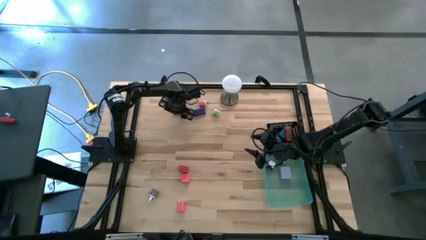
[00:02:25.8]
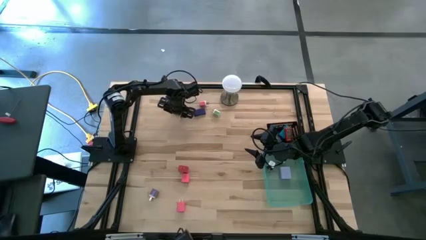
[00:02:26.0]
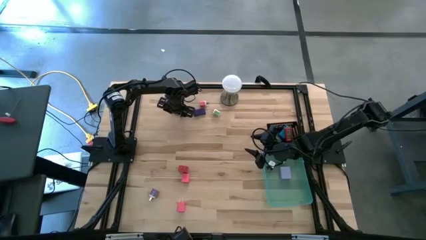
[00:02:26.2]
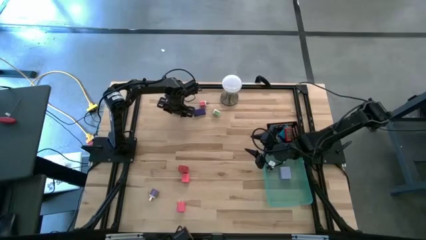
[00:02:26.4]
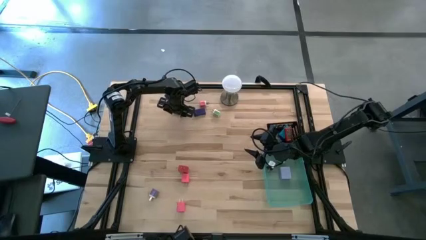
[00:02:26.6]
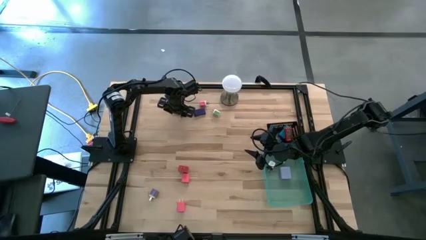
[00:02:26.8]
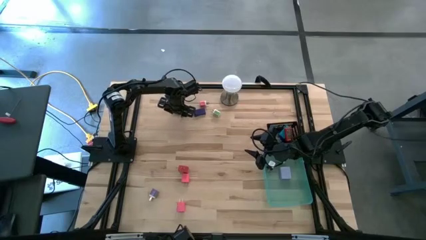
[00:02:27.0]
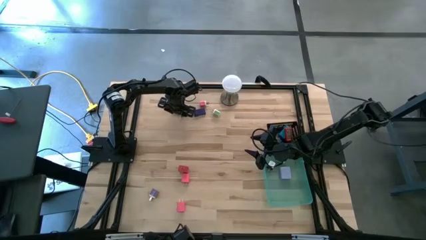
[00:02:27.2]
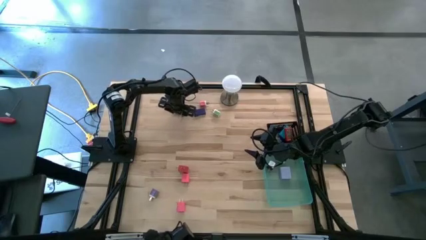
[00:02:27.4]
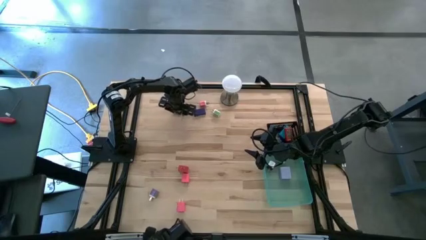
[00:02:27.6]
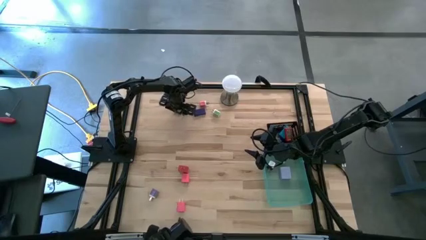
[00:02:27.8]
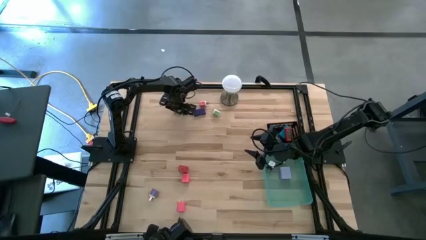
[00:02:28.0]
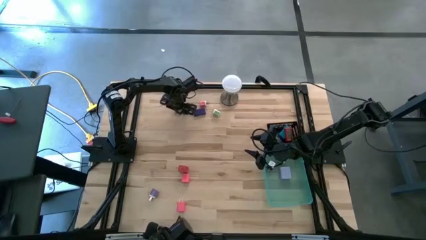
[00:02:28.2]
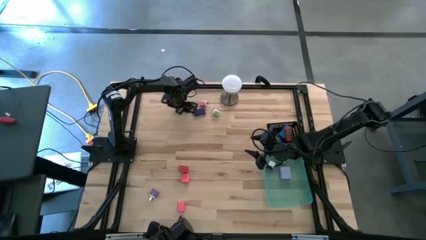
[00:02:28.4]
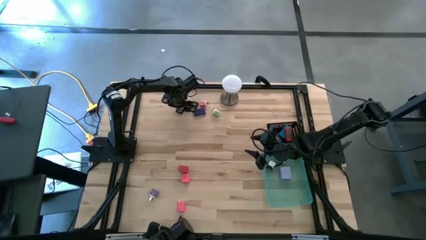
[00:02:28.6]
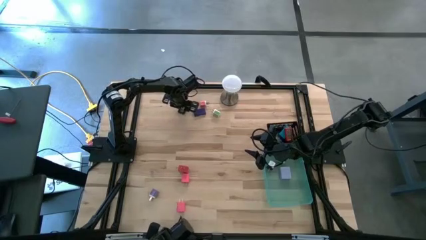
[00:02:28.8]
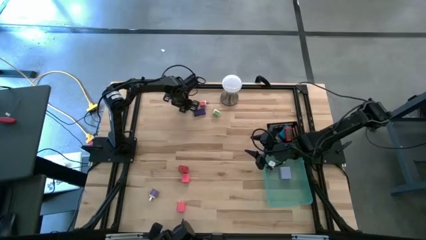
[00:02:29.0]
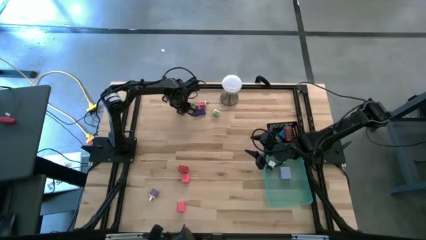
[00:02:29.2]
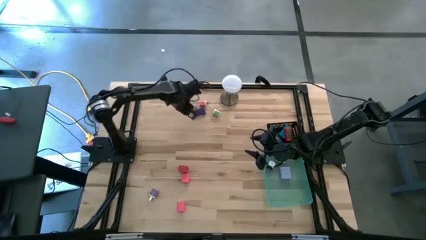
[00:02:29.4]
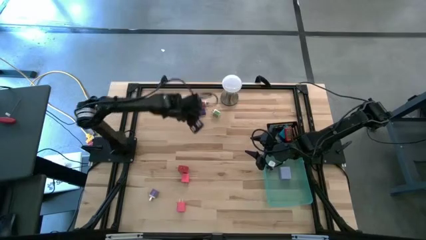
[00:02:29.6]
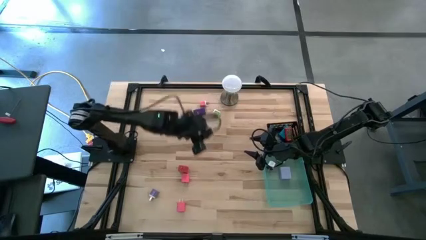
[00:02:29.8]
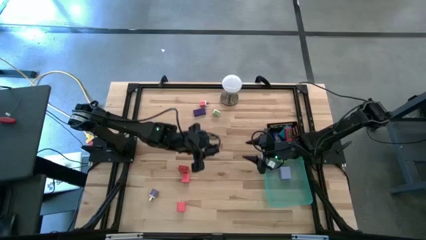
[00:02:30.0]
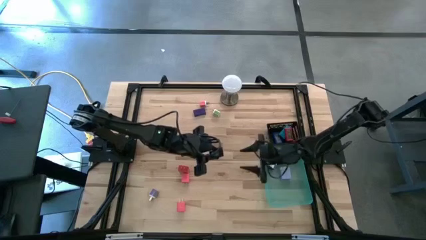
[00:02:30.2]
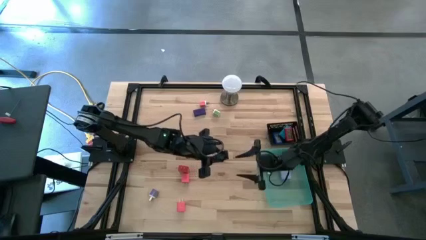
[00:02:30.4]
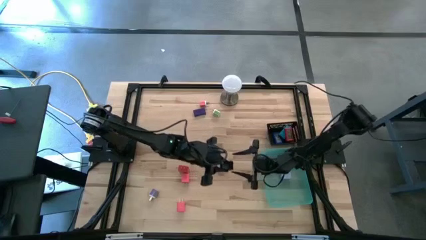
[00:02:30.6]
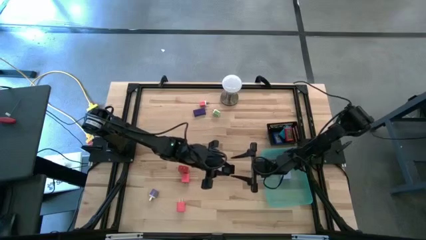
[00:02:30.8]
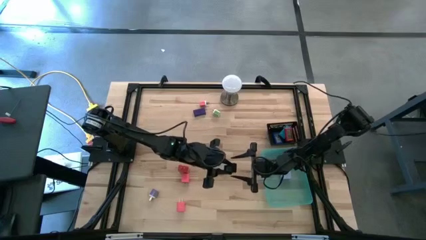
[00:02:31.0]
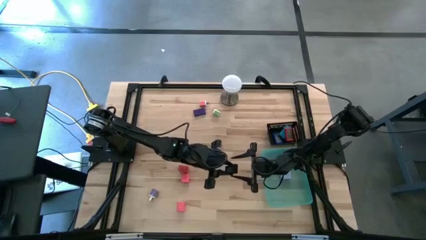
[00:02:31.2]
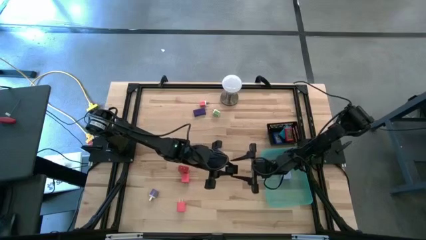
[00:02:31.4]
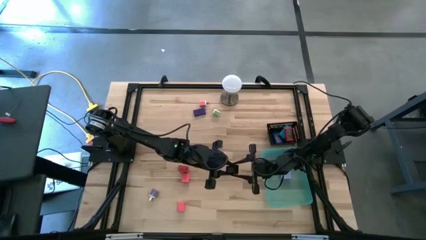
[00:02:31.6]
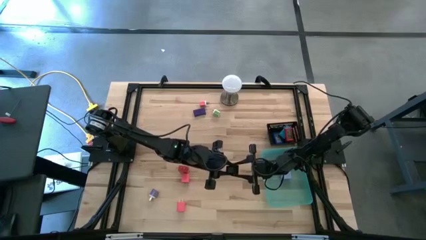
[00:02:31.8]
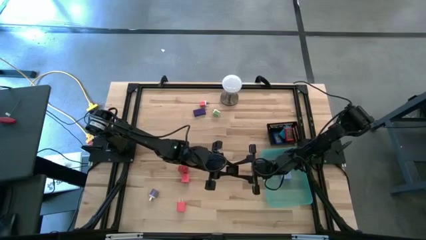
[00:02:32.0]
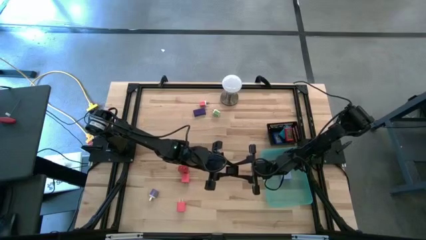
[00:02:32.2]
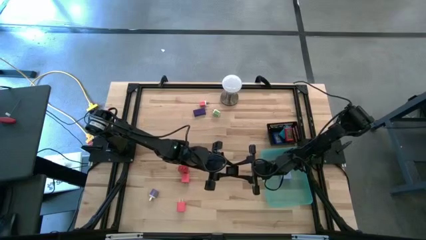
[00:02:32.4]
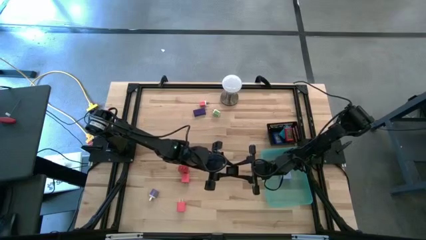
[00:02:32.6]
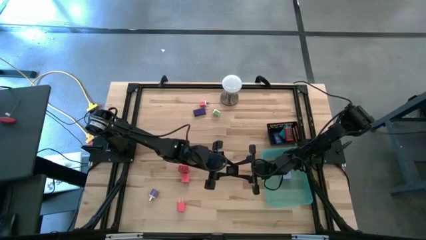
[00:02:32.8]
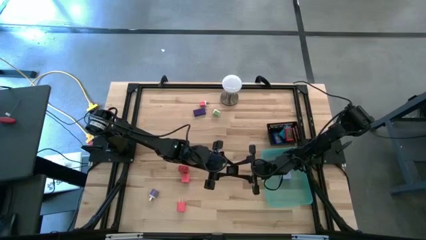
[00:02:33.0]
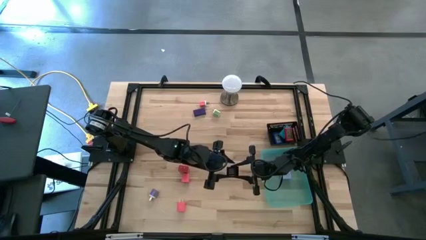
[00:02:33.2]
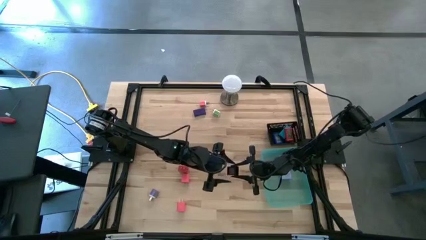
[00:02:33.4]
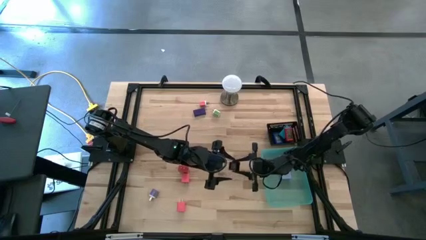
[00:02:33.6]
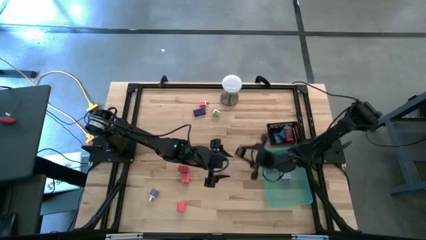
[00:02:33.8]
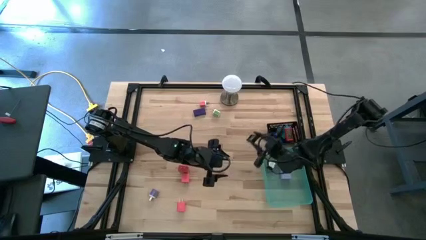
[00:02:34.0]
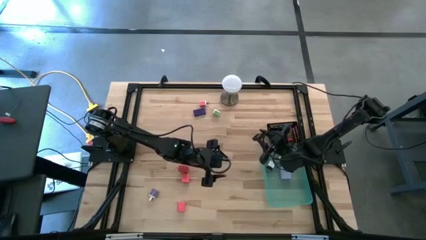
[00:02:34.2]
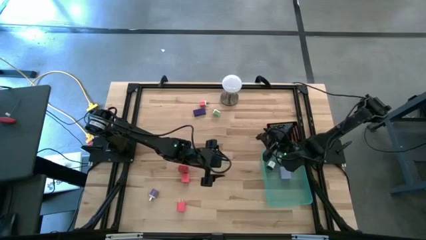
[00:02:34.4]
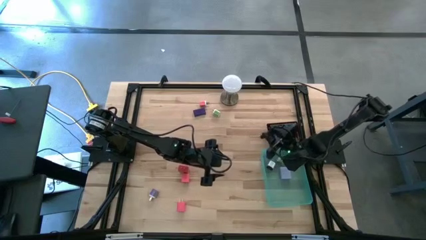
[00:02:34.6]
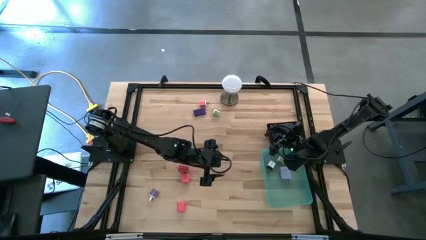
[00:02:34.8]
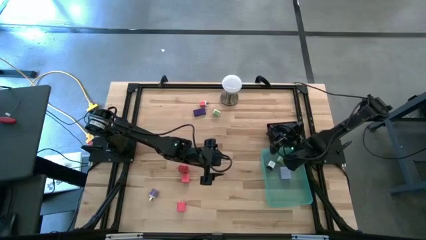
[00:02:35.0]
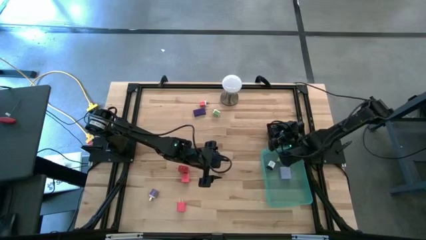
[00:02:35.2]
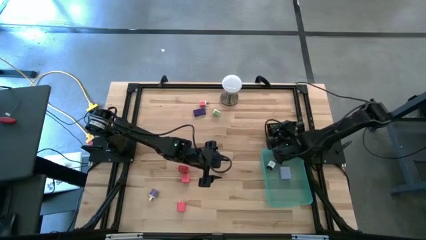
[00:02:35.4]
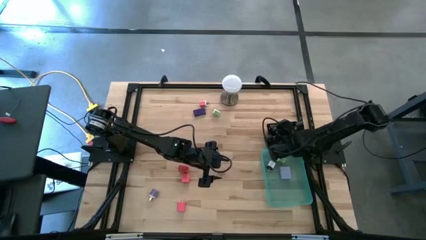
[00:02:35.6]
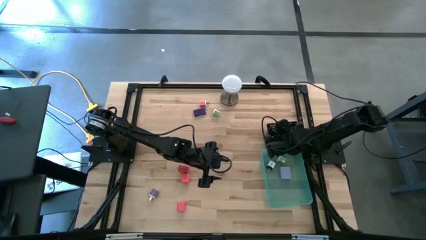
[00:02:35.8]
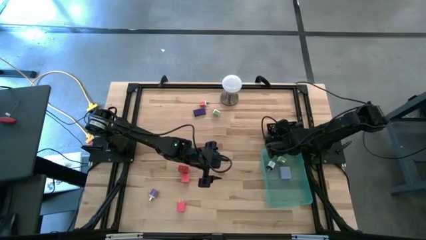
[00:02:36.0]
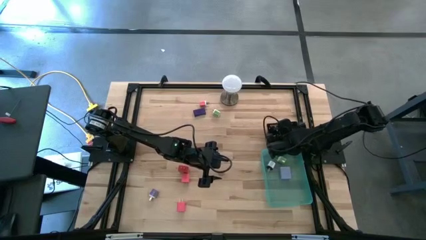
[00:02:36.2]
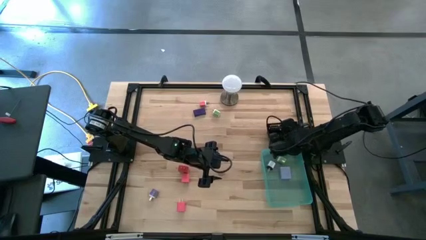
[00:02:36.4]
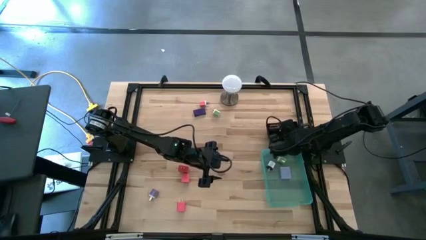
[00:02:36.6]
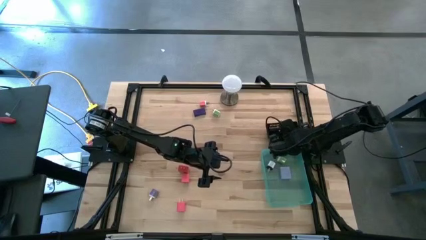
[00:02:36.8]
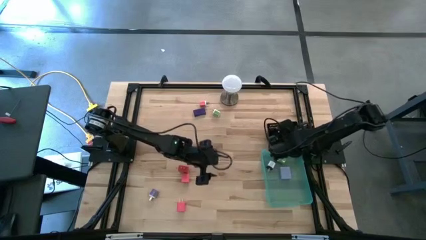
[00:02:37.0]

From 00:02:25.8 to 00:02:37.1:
Task: Pick & Place Office items
Put the black digital clock into the black basket

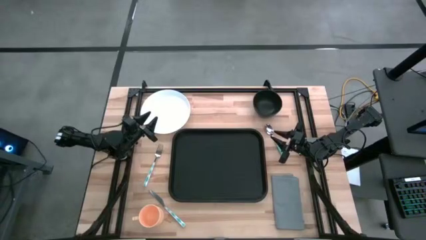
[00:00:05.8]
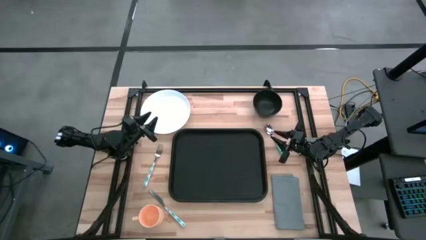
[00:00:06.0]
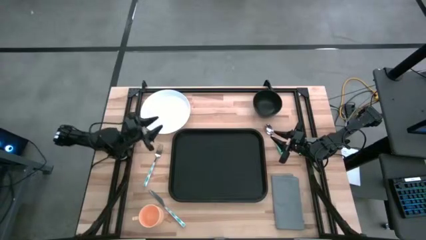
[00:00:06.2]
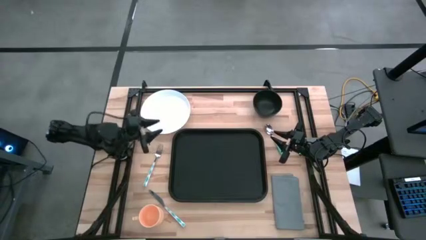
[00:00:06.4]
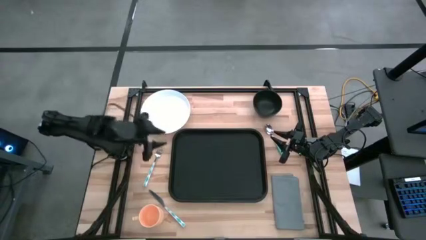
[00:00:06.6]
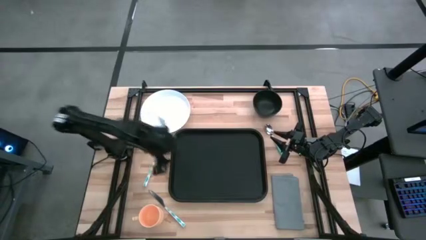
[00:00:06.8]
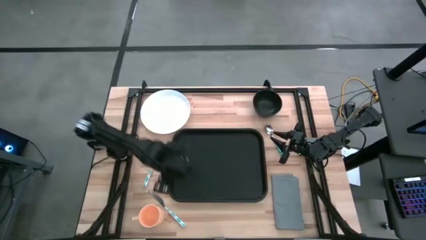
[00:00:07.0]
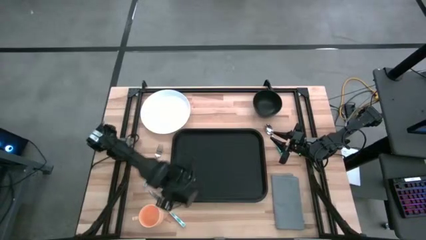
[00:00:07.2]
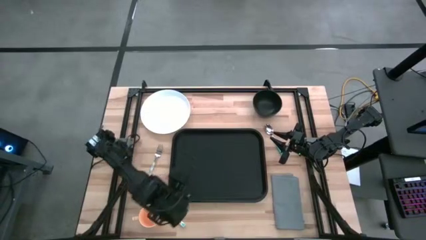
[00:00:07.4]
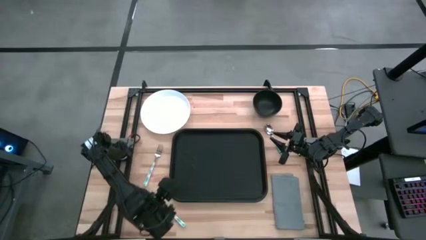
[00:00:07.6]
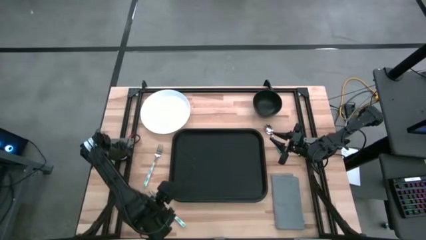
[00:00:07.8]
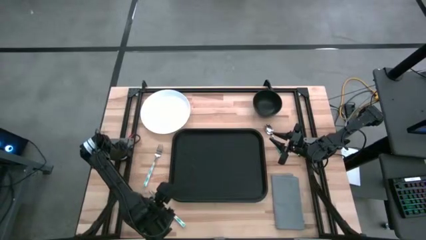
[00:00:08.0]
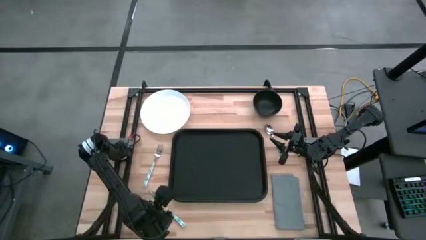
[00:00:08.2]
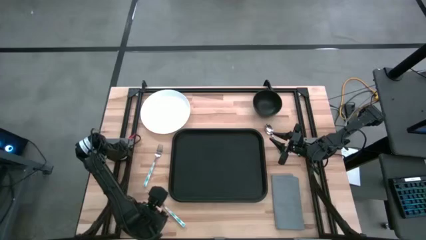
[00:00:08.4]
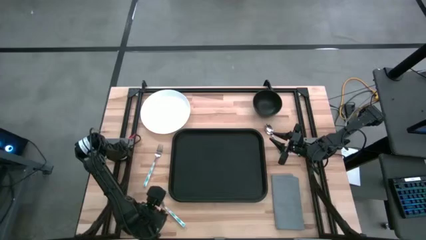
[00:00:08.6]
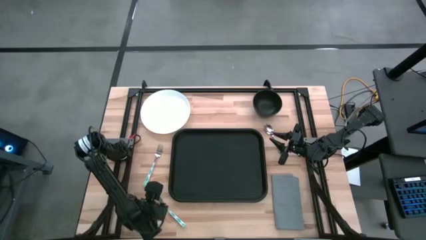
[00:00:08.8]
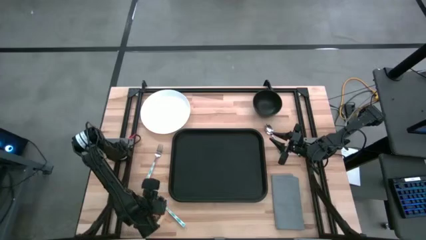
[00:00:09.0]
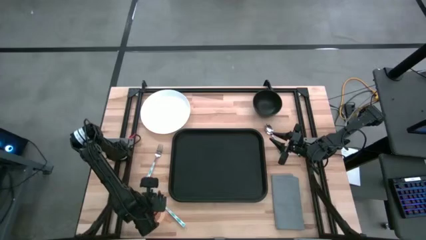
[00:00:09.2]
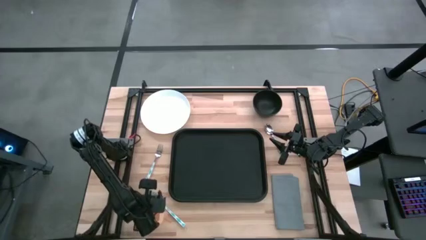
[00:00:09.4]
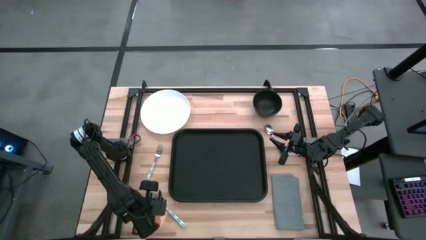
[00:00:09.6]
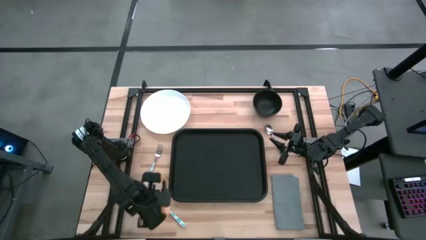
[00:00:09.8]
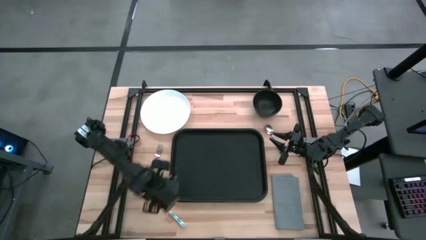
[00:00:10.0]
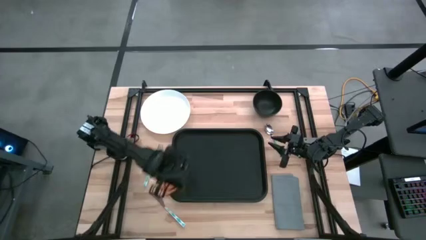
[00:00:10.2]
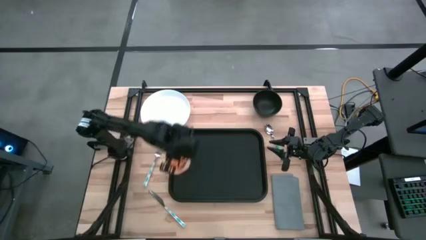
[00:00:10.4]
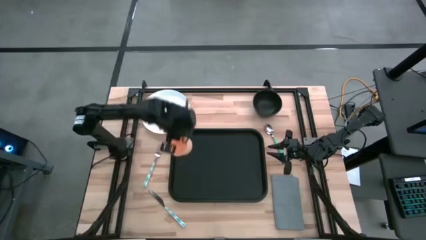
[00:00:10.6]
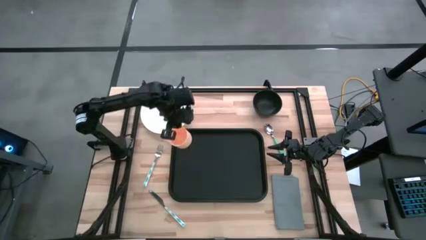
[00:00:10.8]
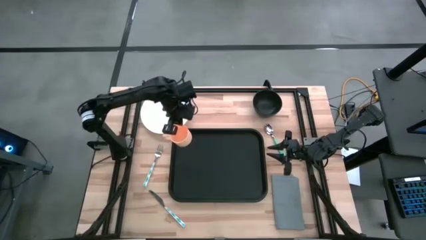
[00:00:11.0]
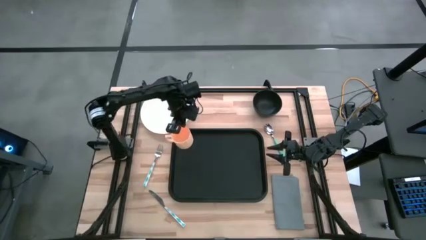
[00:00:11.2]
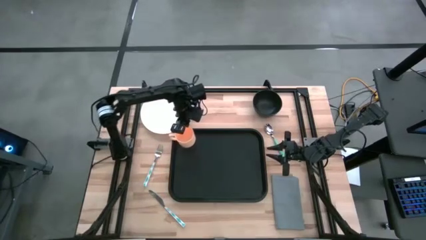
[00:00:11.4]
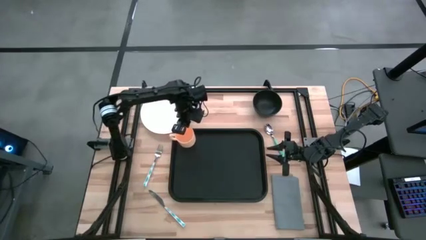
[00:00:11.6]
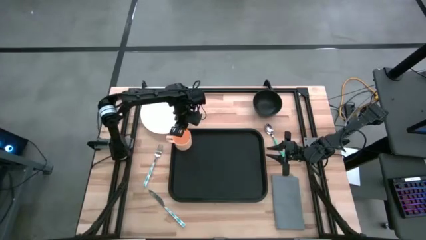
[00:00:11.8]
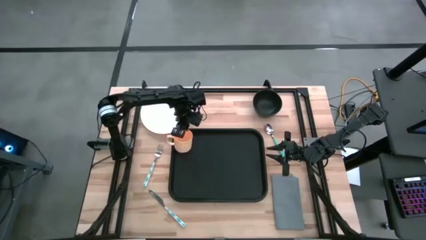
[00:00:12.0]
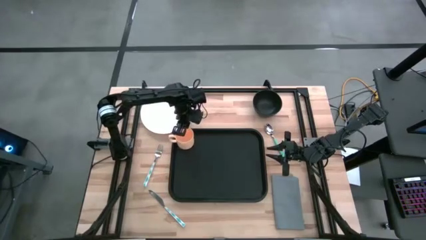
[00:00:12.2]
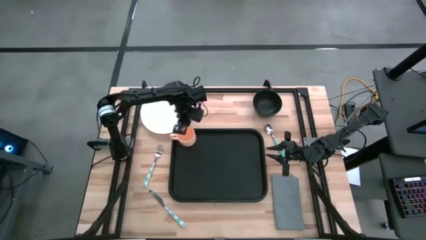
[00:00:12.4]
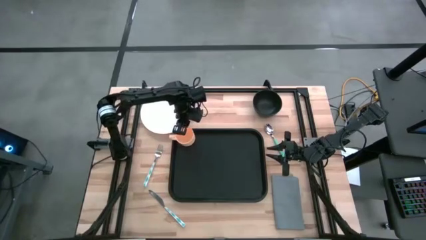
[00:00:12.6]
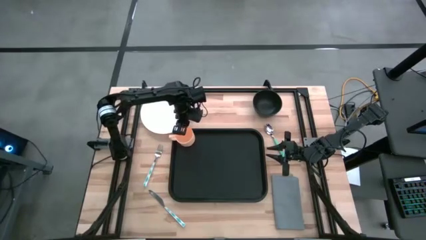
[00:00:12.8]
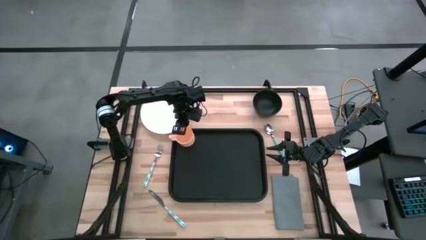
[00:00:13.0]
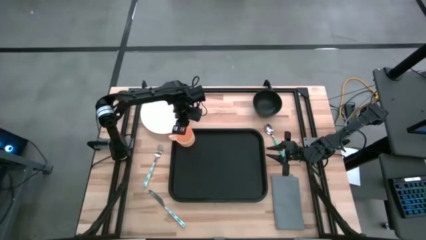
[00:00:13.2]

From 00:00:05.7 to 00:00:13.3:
Task: Set up tray
Put the orange mug on the top left of the black serving tray
